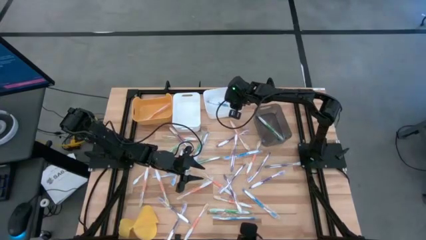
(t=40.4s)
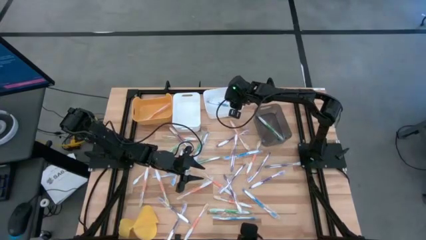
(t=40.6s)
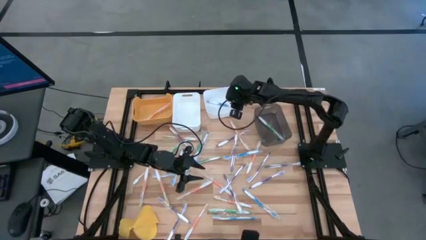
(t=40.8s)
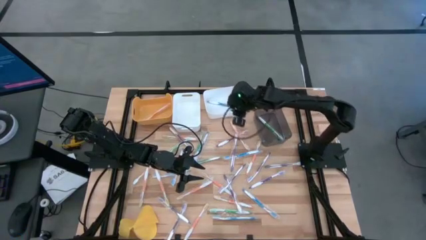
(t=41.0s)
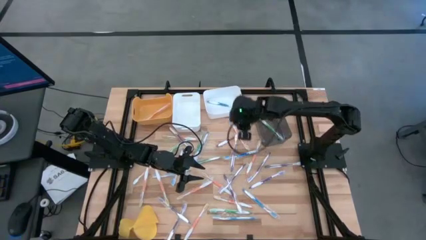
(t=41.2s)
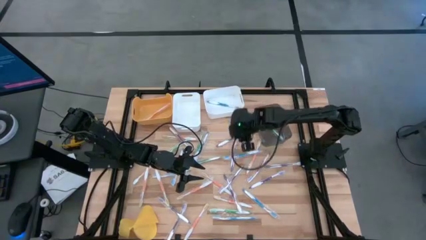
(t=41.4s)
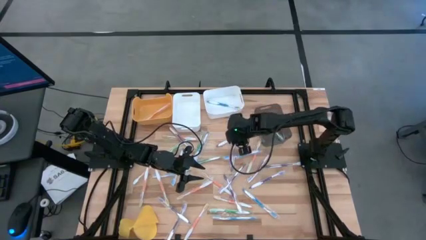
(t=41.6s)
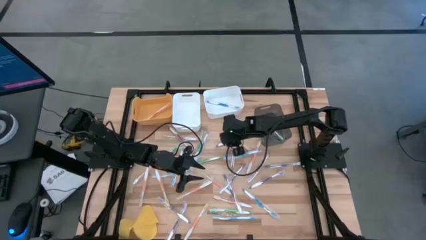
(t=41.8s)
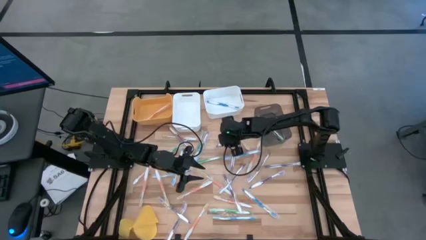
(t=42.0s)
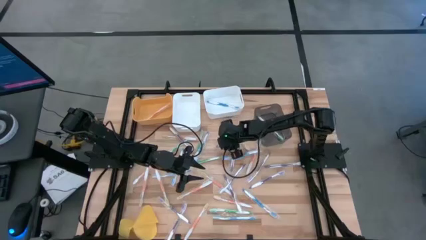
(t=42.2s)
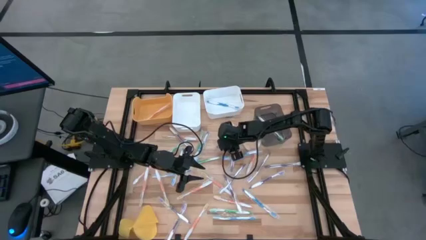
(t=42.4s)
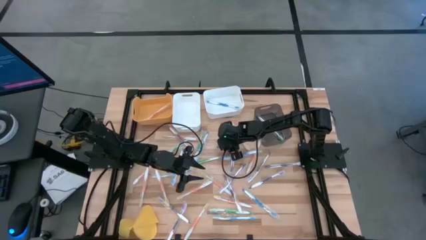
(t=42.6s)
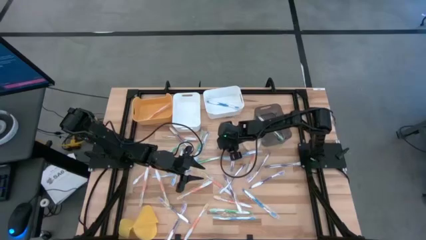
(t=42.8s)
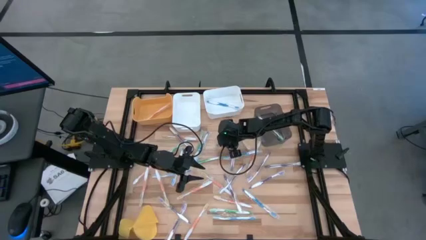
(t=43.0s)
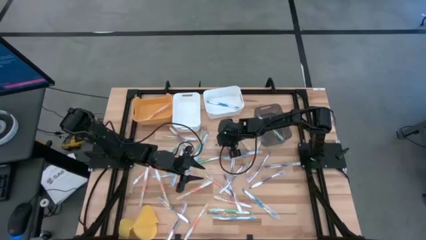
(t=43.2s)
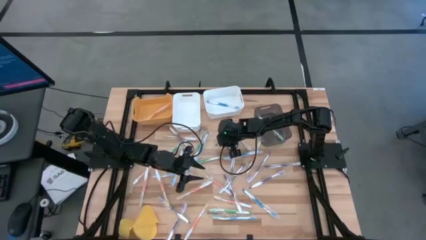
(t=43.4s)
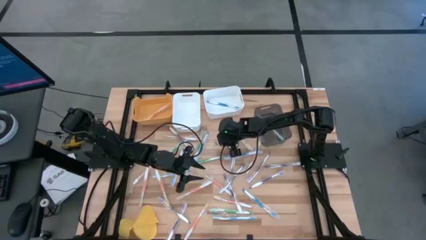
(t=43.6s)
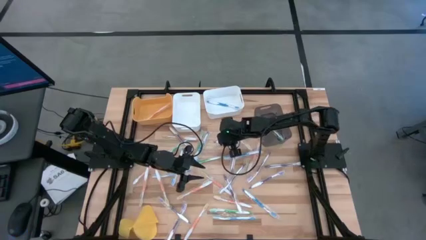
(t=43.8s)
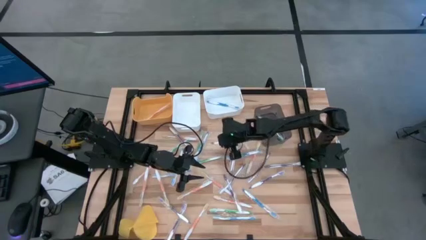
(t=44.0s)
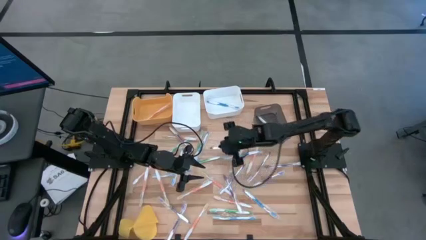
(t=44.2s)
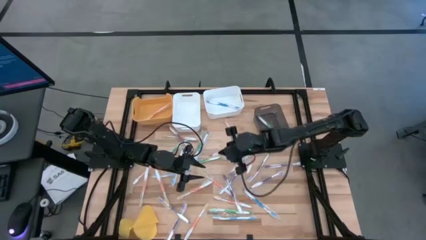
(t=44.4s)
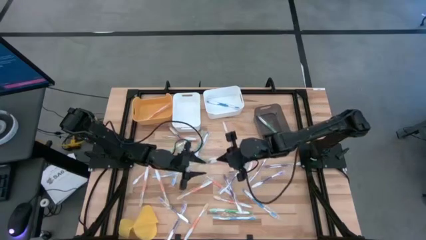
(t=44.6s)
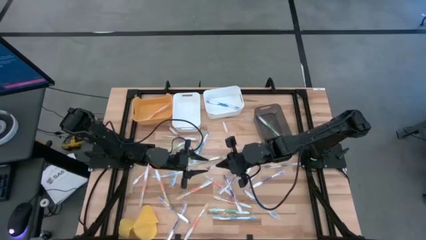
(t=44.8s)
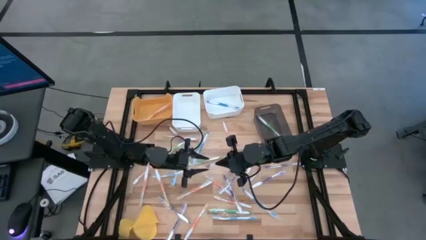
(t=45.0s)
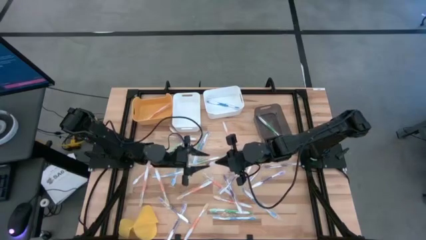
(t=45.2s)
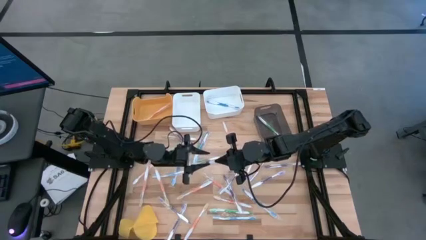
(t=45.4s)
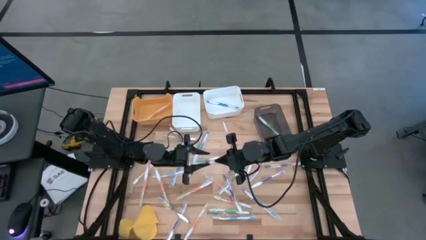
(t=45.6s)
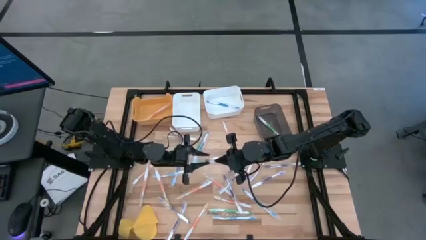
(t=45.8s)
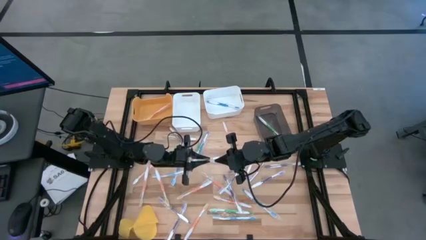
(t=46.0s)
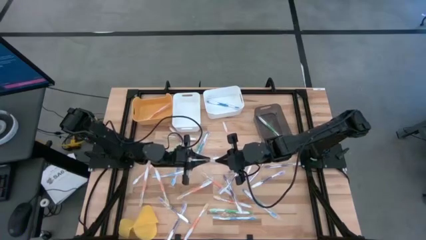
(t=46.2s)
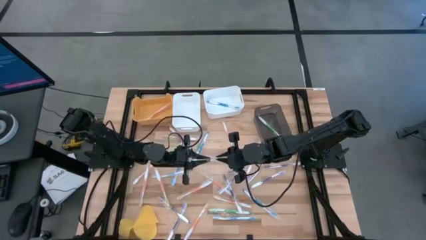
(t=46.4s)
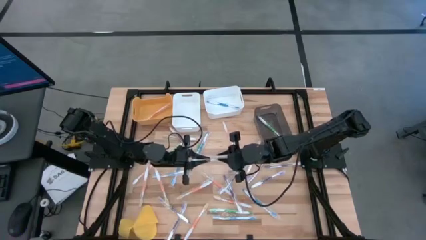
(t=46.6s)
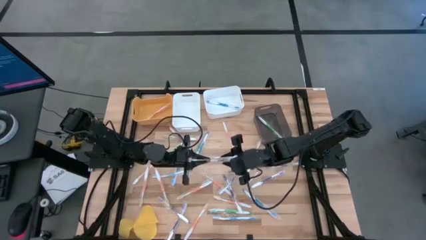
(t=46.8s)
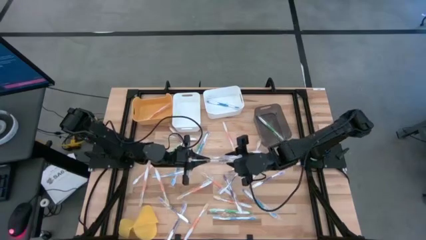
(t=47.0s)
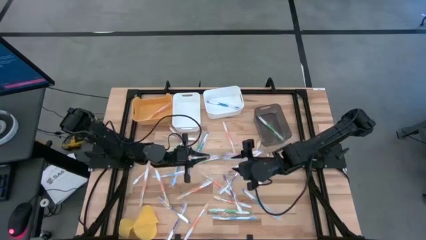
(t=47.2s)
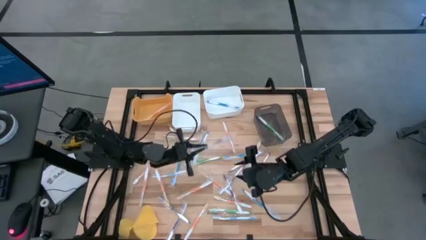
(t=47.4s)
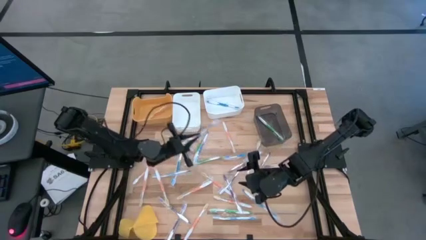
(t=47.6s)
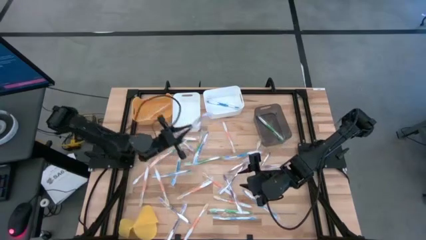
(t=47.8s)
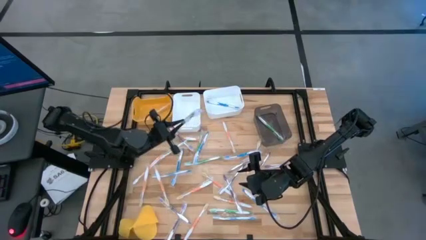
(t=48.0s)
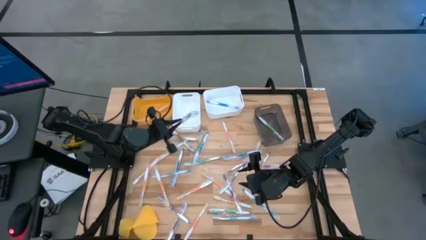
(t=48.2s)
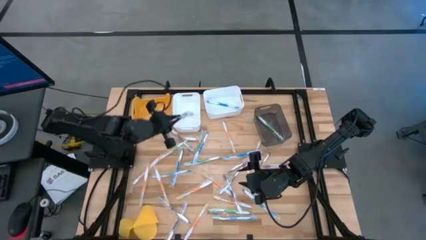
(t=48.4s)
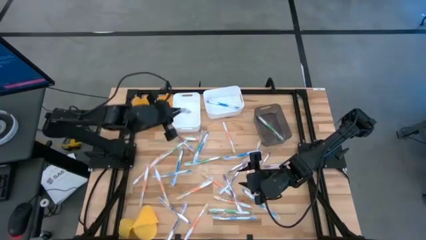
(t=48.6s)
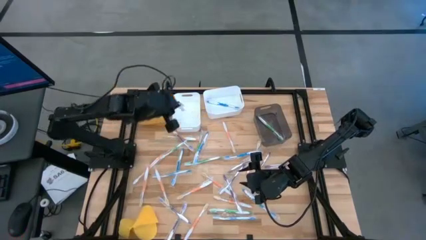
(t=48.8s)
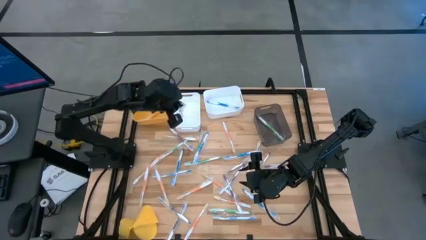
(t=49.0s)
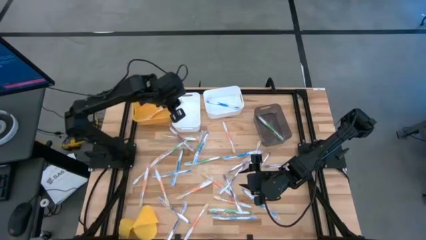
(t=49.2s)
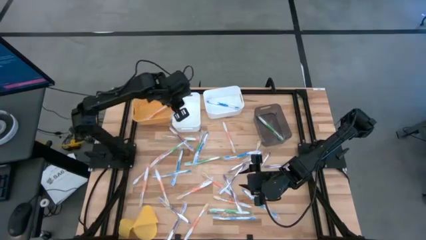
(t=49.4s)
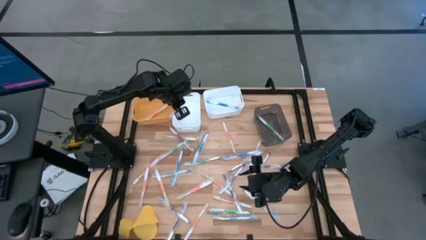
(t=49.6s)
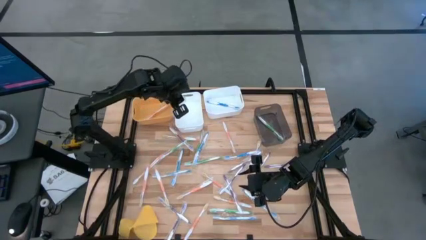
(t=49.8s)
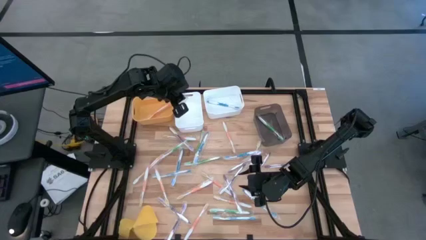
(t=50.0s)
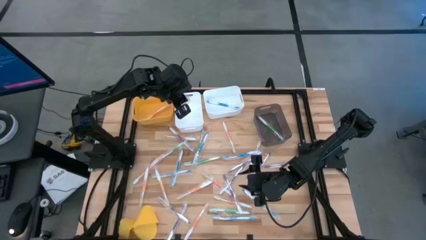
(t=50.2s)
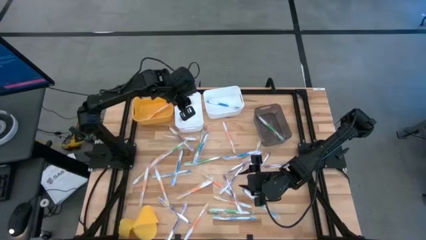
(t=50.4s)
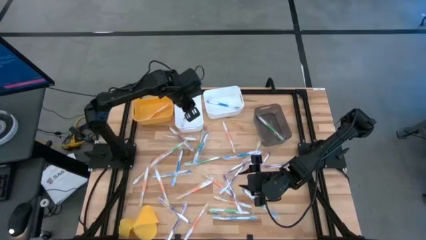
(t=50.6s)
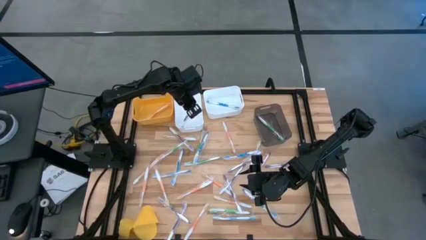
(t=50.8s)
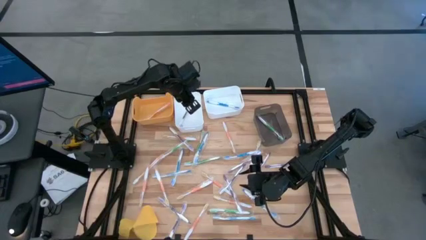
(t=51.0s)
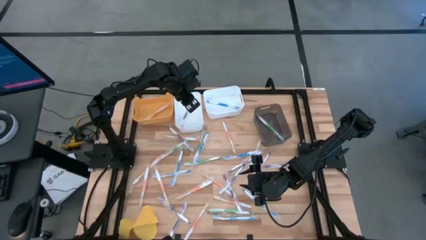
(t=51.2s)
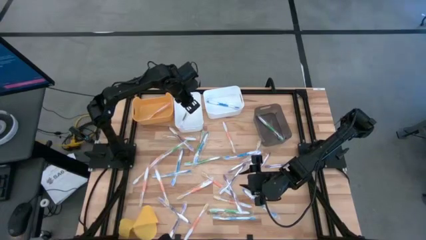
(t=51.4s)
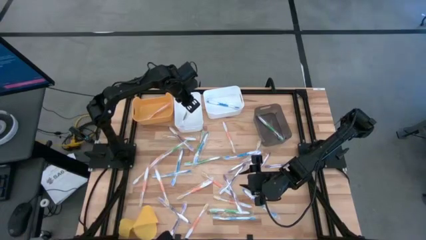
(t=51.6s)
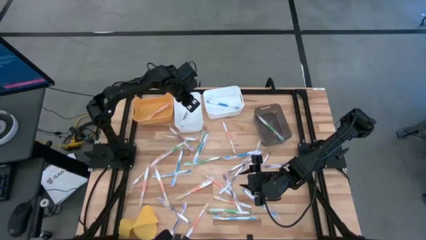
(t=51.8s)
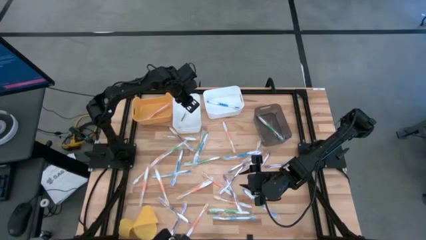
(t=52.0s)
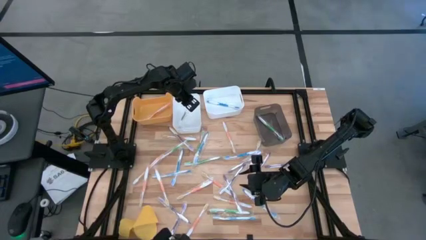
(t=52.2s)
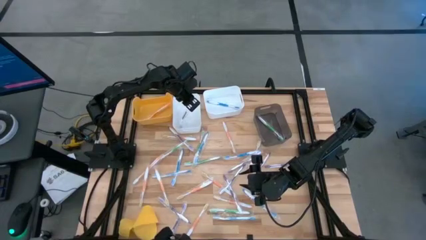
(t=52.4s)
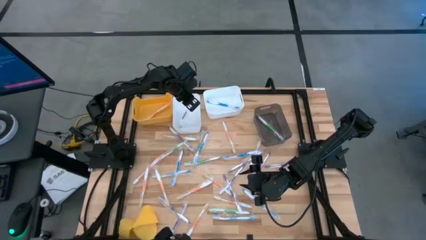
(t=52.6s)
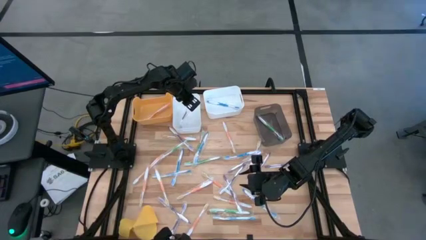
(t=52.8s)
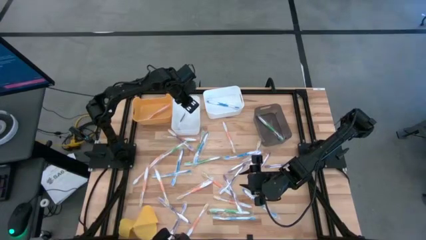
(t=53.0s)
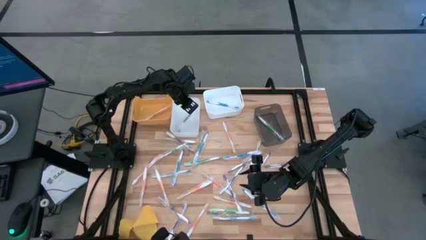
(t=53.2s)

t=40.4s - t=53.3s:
Task: Pick & Place Toothbrushes
Put the purple toothbrush into the left white bin
